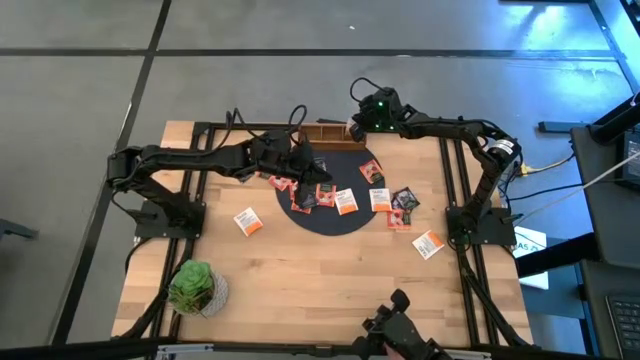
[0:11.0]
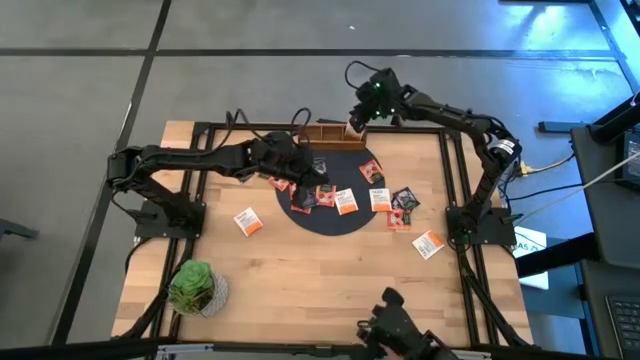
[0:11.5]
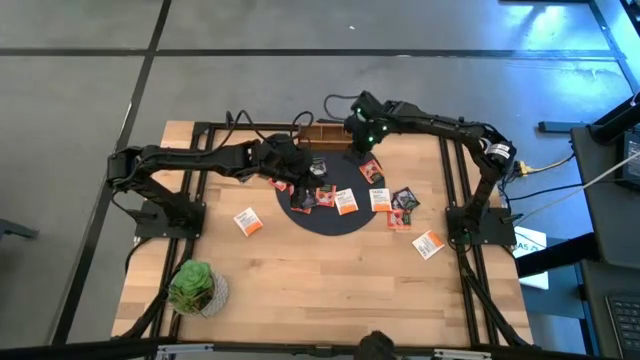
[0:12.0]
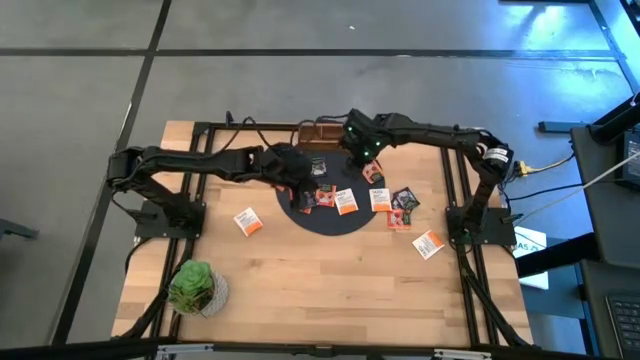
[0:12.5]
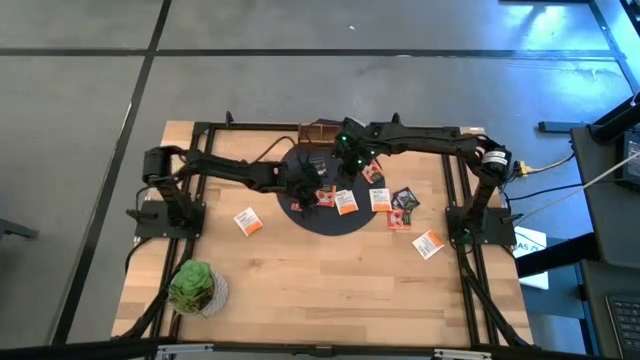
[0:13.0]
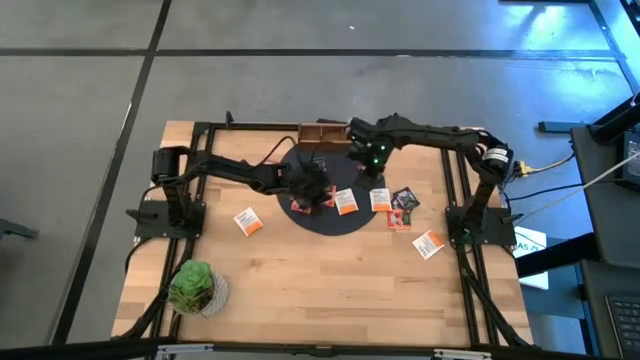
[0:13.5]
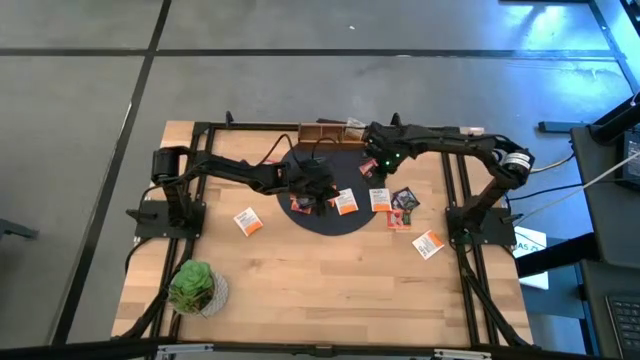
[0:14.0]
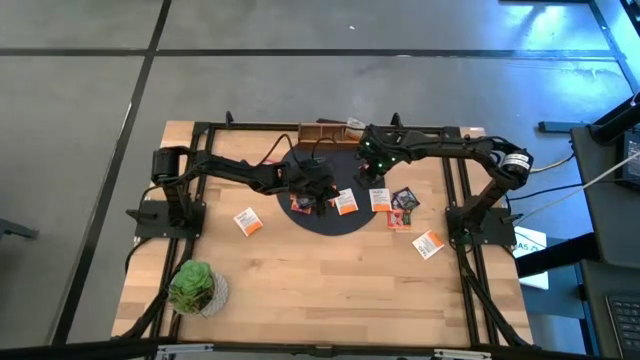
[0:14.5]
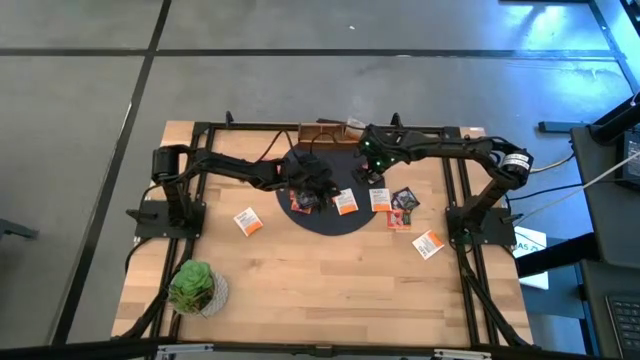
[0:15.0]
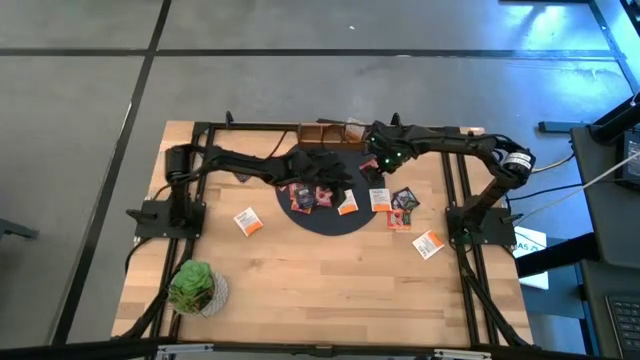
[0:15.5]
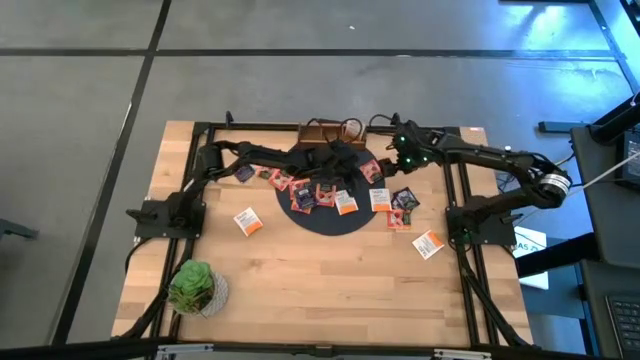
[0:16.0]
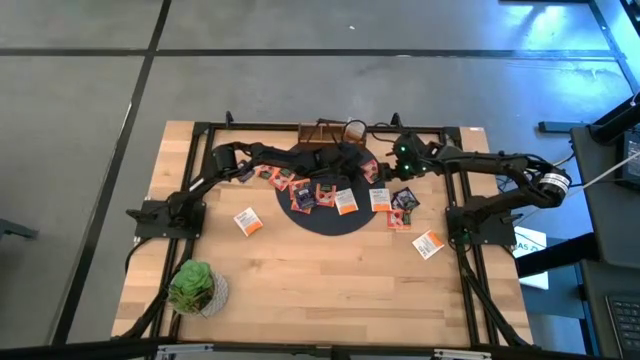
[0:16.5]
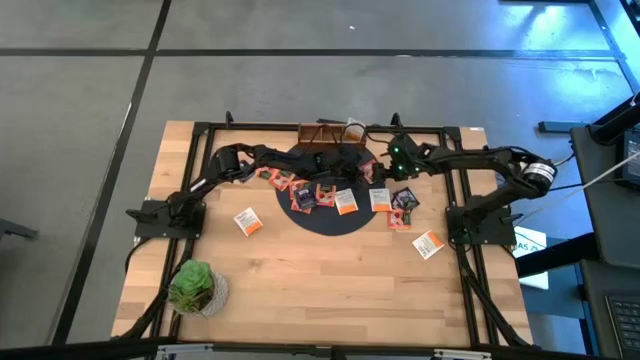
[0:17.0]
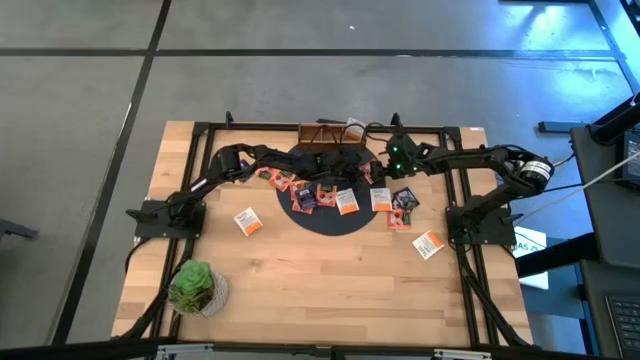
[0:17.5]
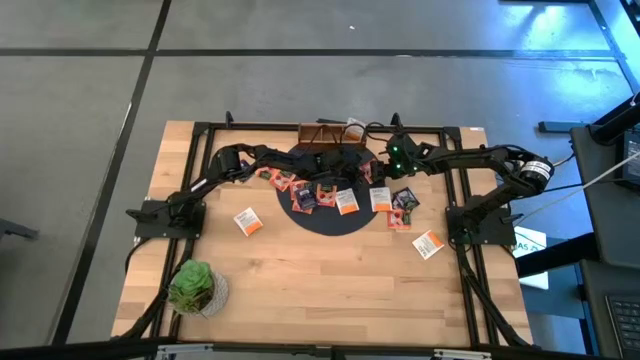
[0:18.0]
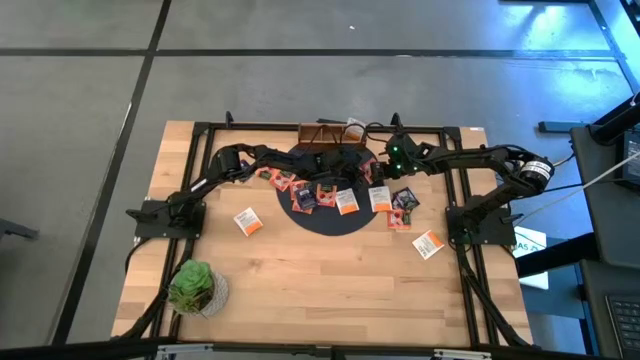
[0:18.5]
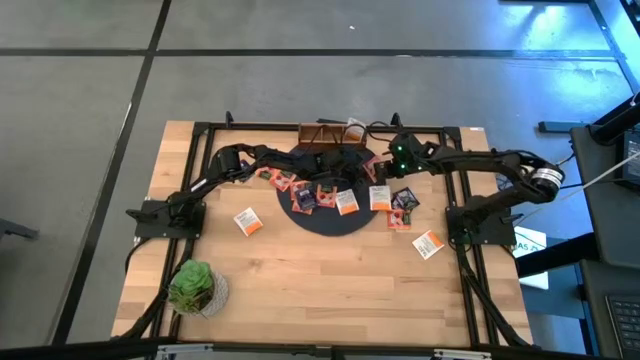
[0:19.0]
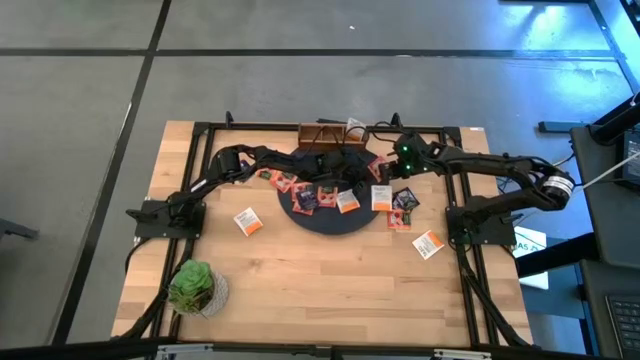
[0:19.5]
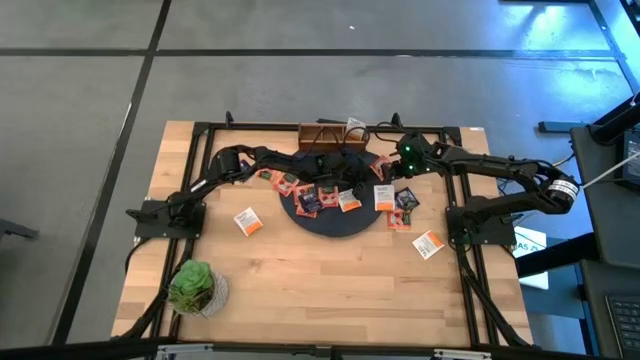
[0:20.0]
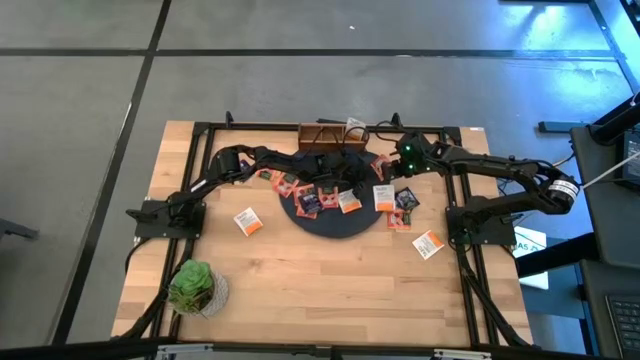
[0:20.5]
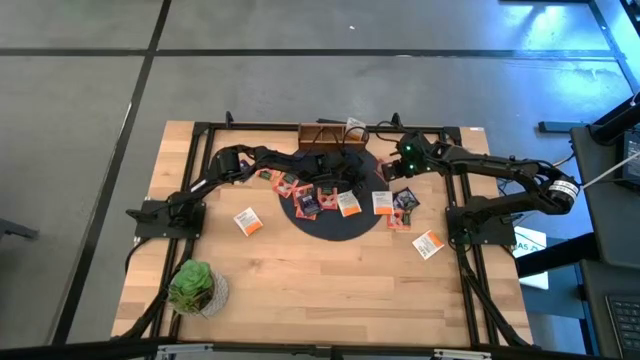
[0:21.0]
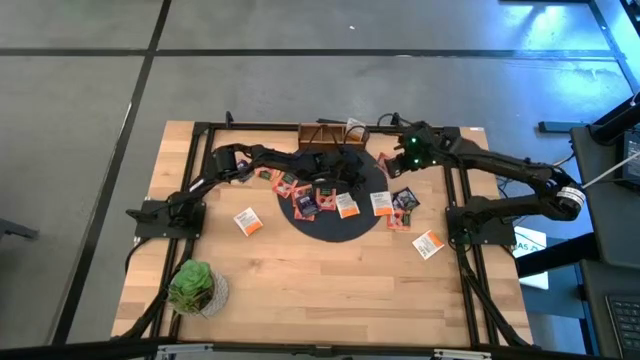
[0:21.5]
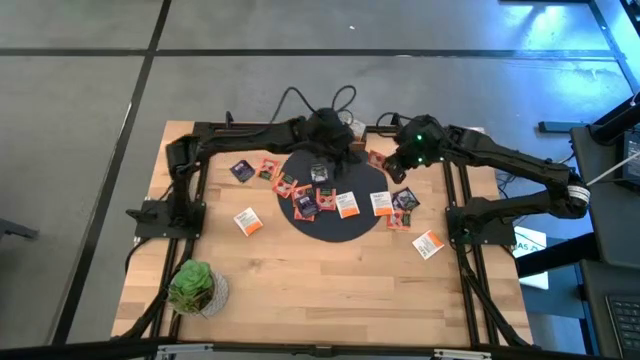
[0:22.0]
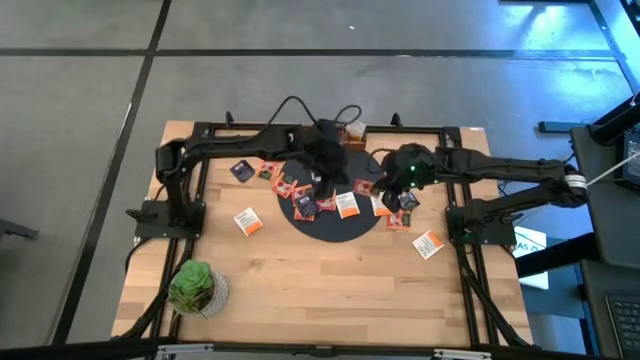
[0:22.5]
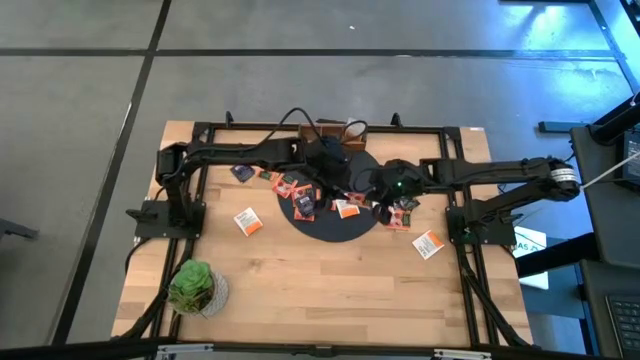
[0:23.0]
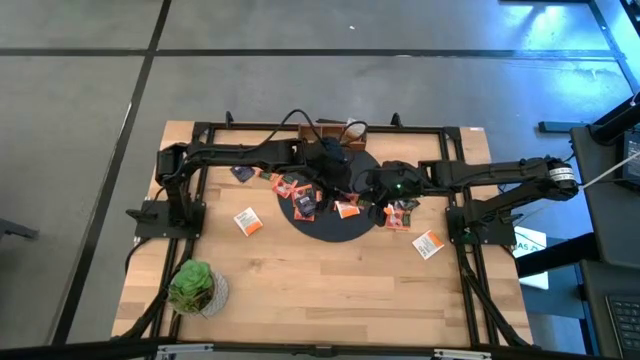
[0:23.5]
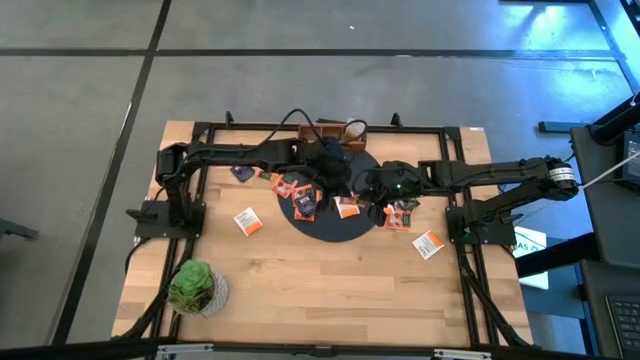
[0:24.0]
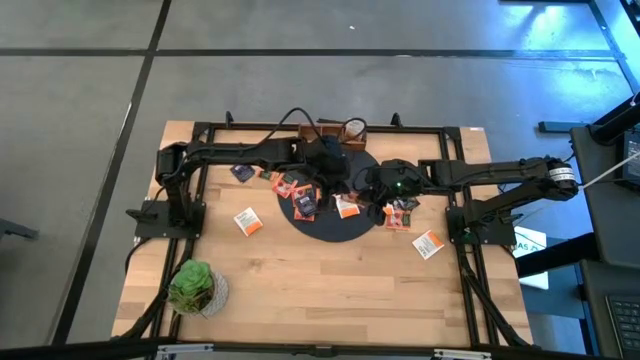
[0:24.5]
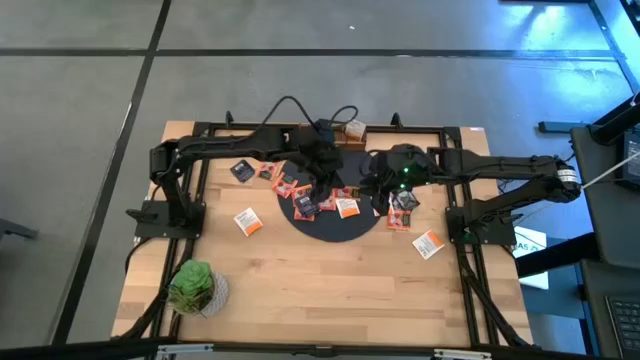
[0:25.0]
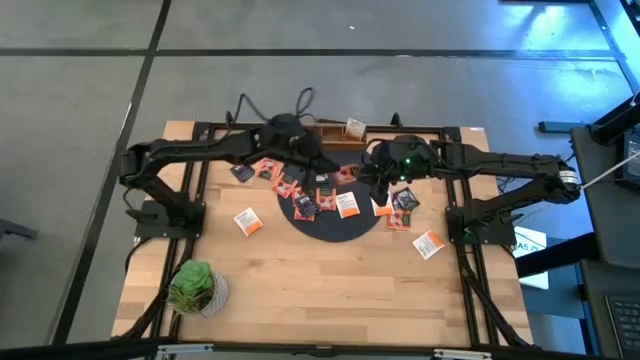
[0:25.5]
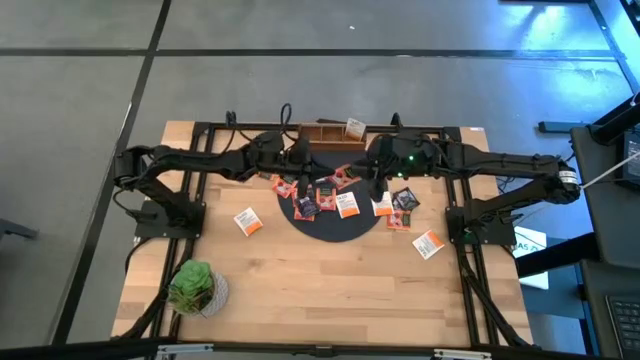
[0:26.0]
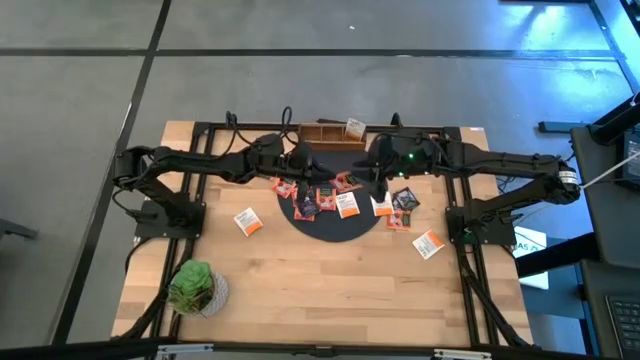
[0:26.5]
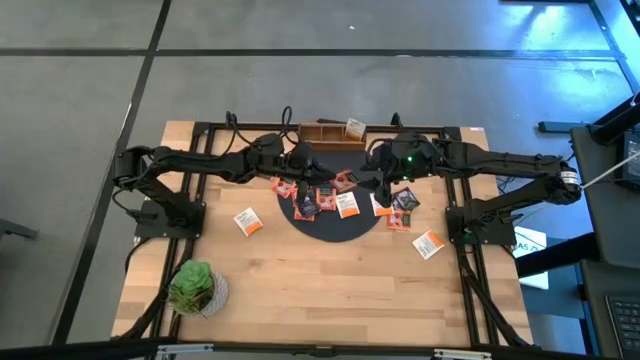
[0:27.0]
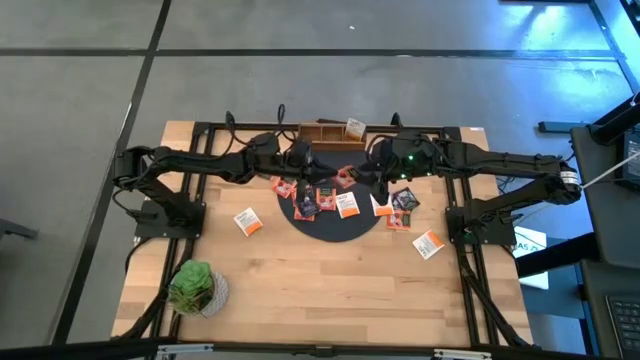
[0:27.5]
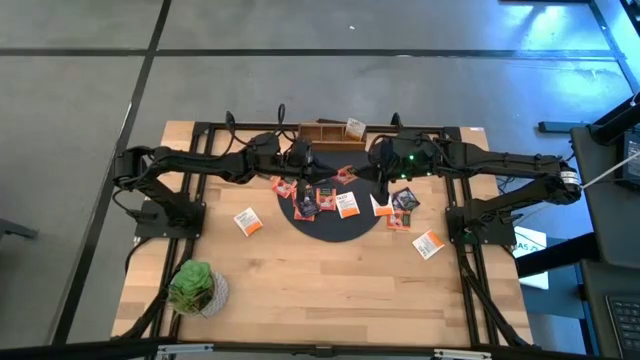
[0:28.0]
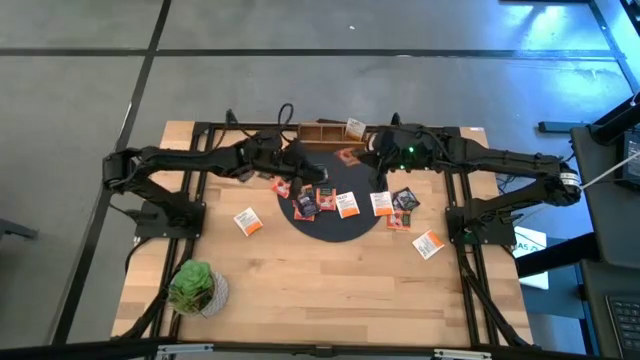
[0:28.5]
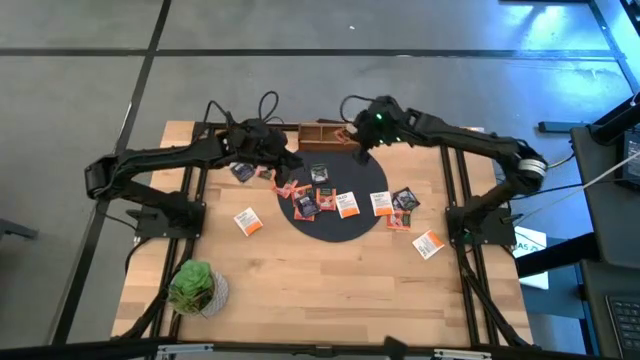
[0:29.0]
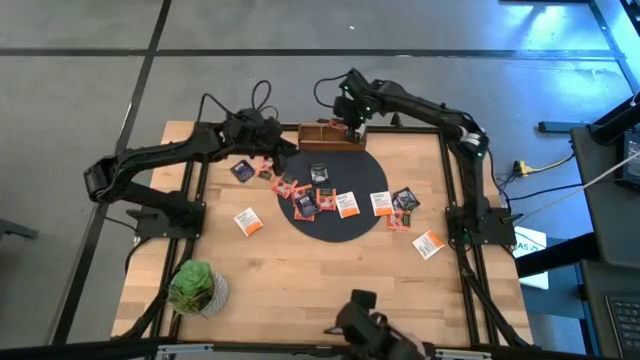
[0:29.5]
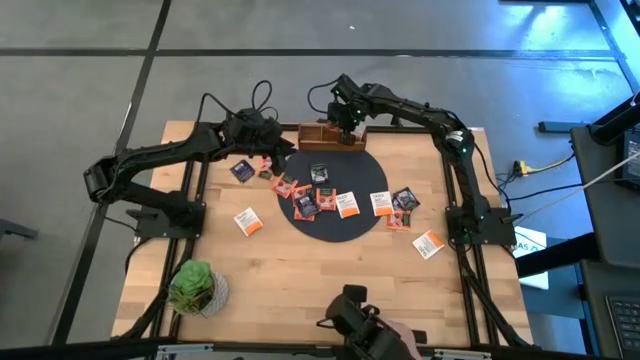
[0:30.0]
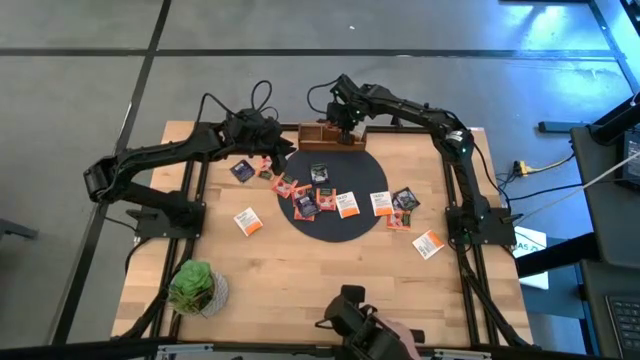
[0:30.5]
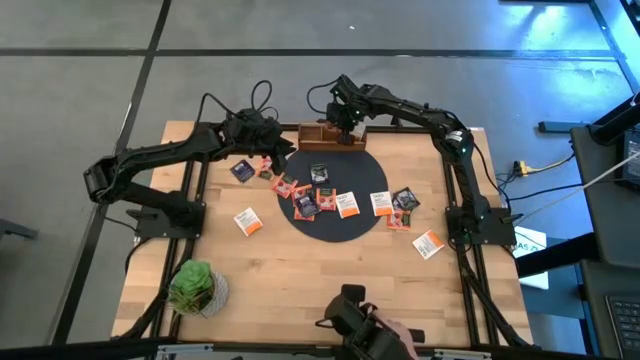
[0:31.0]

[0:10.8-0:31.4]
Task: Pick & Place Tea
Put the orange tea bag into the middle section of the wooden organizer
